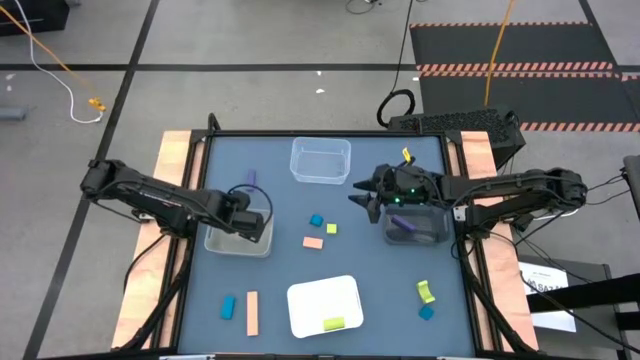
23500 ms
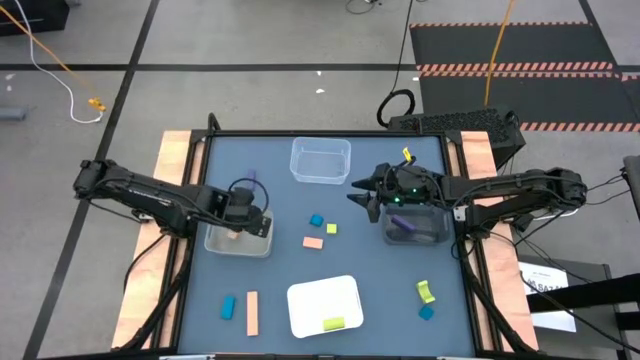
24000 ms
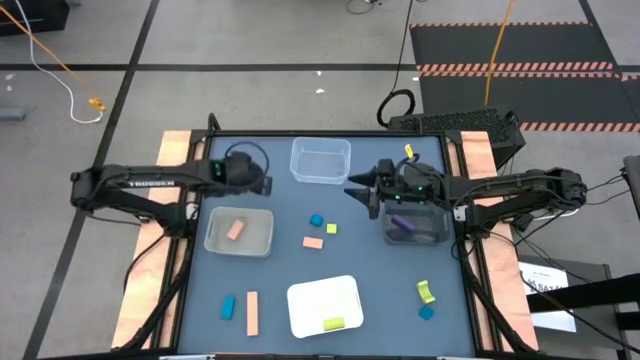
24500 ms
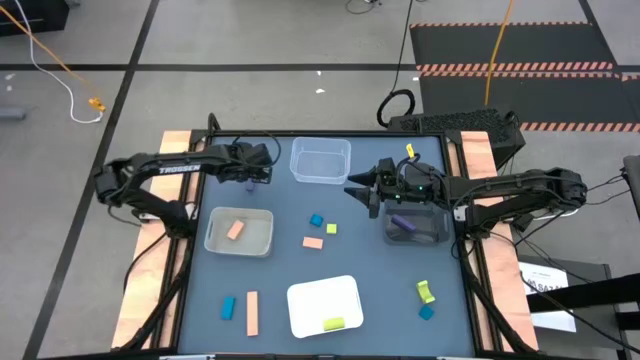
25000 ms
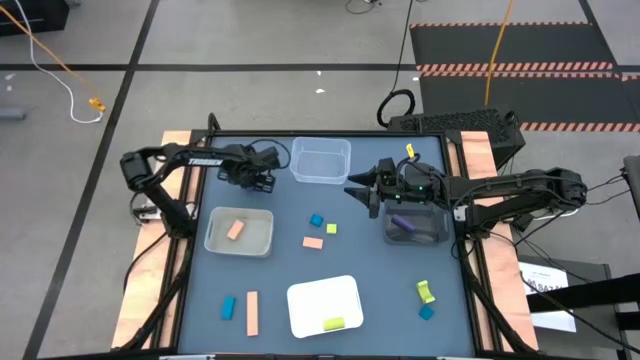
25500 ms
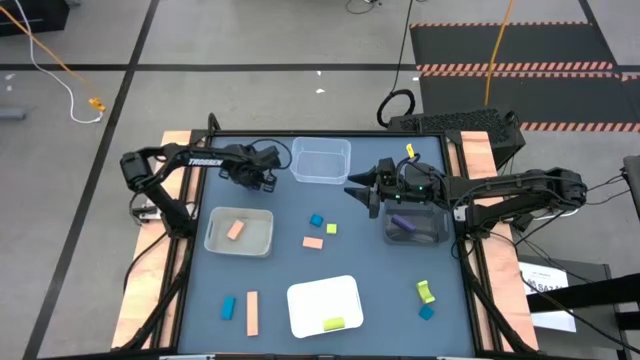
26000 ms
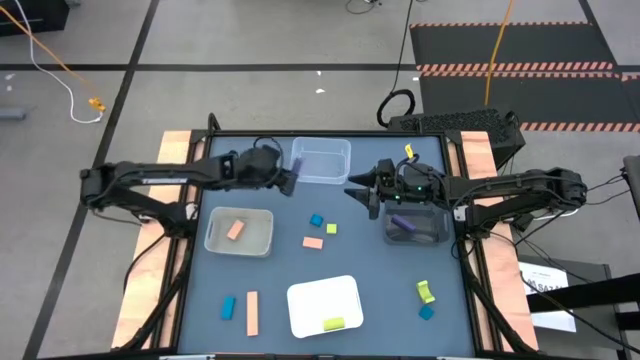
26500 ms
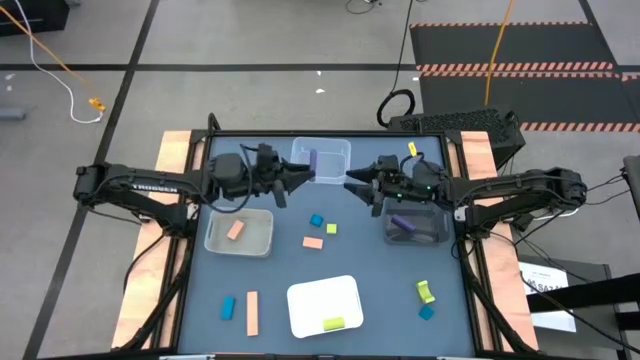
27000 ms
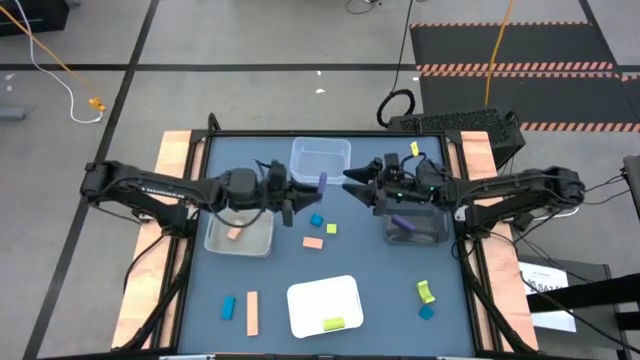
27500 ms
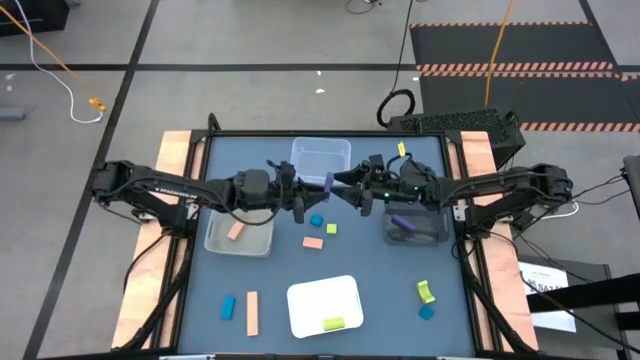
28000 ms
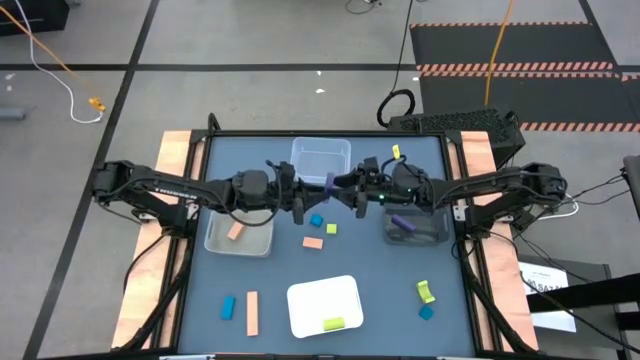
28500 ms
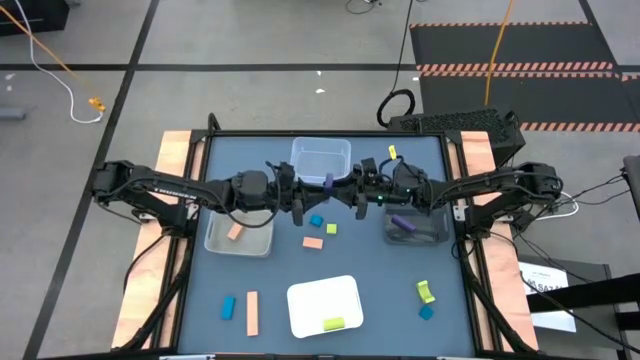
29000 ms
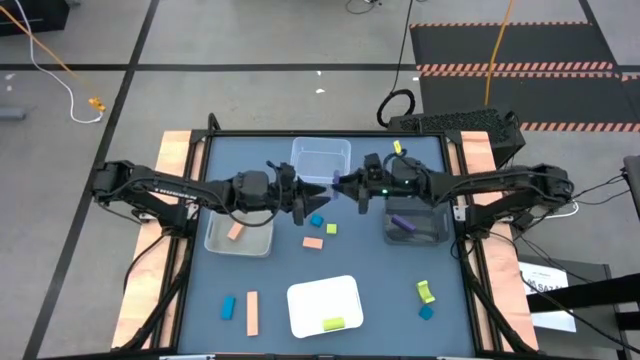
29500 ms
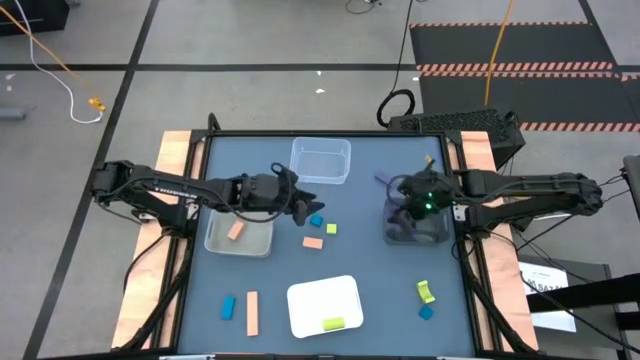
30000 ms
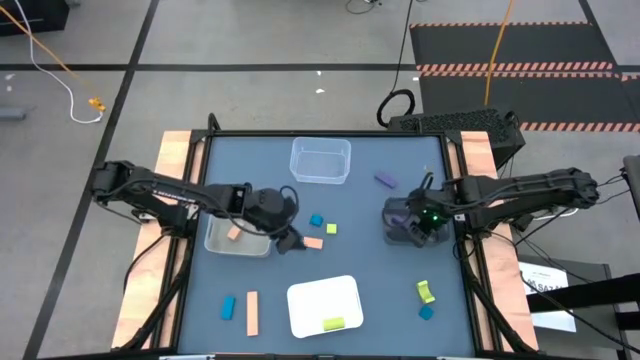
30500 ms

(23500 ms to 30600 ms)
Task: Sort & place blocks by color
Put the violet block into the black bin

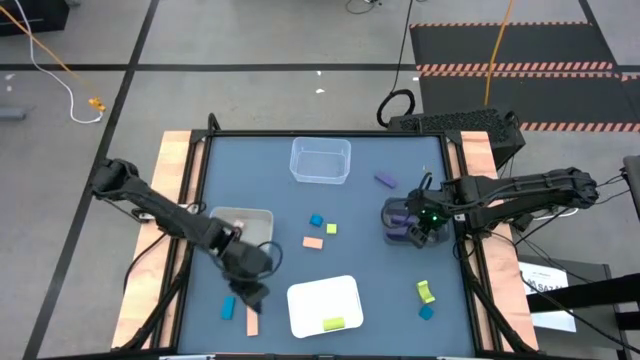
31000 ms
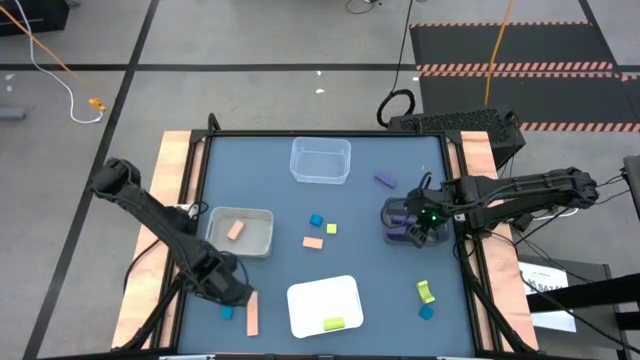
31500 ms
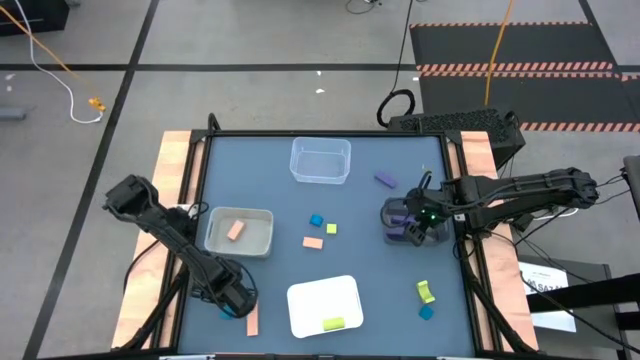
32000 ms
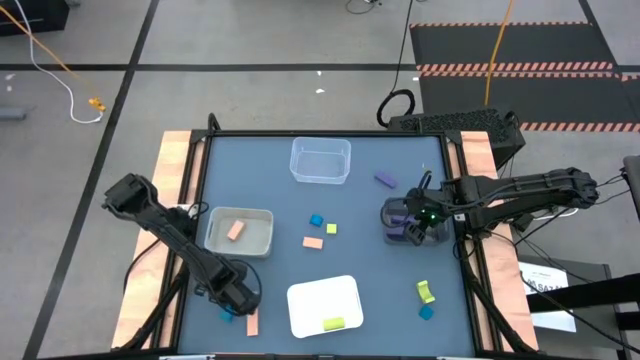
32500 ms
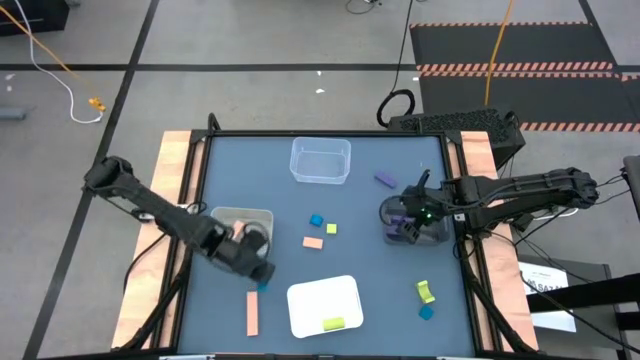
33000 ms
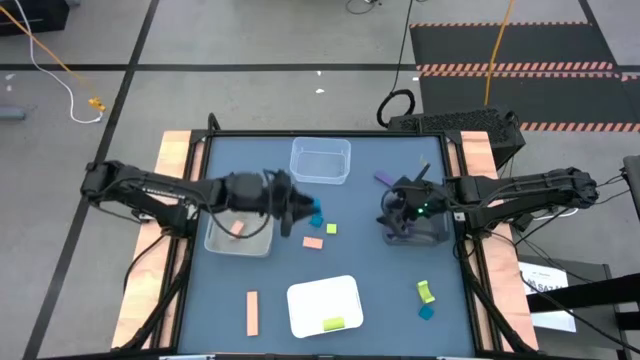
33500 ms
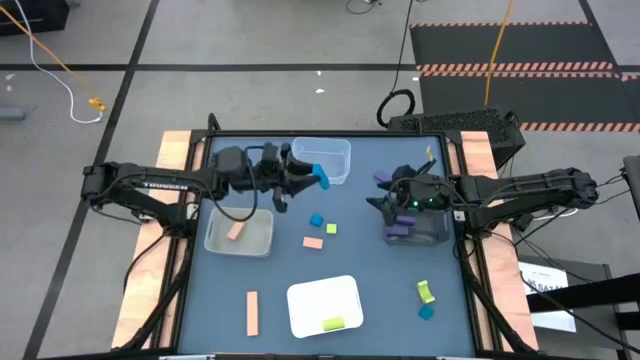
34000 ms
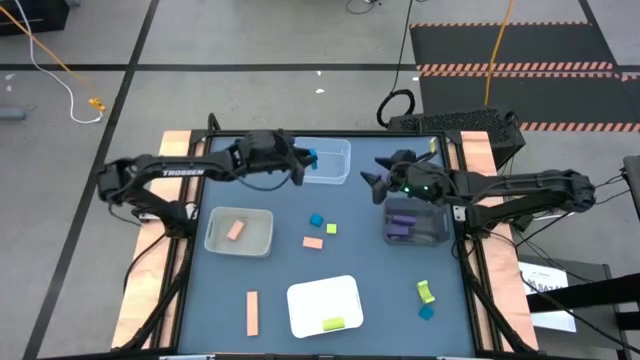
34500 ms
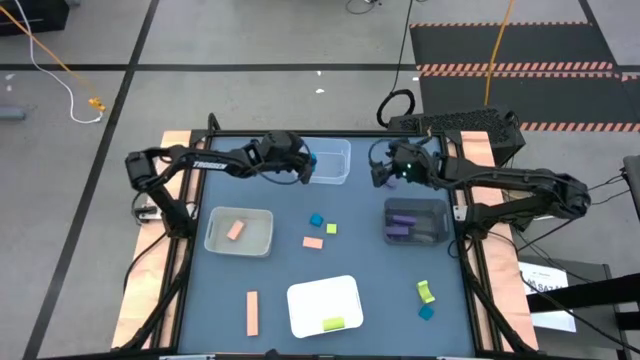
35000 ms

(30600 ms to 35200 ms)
Put the blue block into the transparent bin

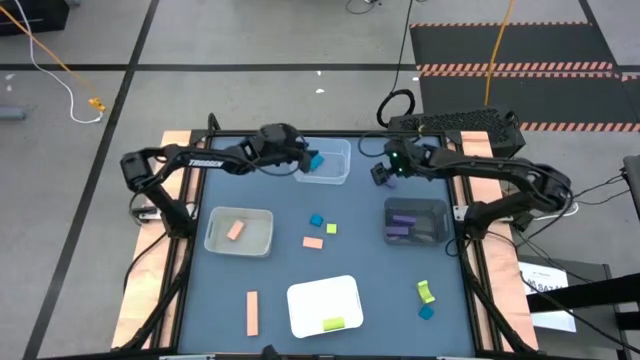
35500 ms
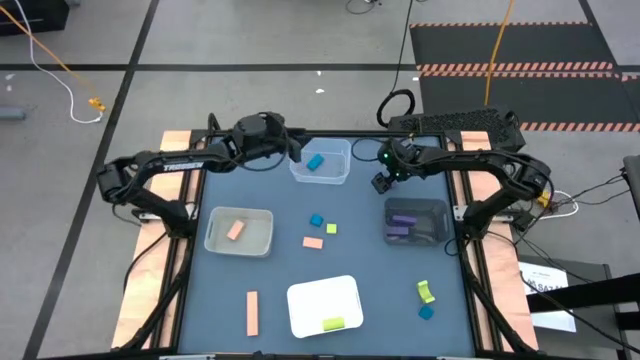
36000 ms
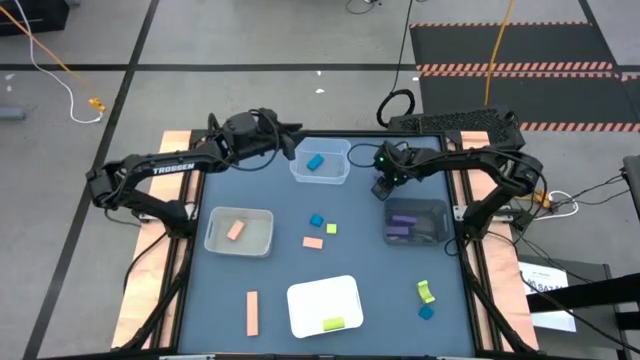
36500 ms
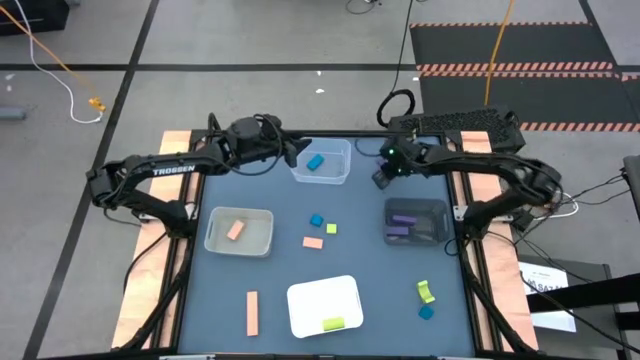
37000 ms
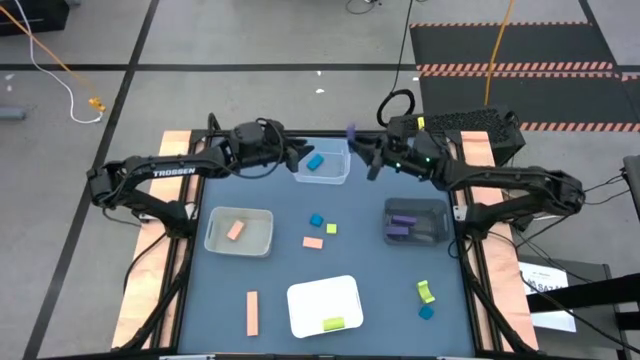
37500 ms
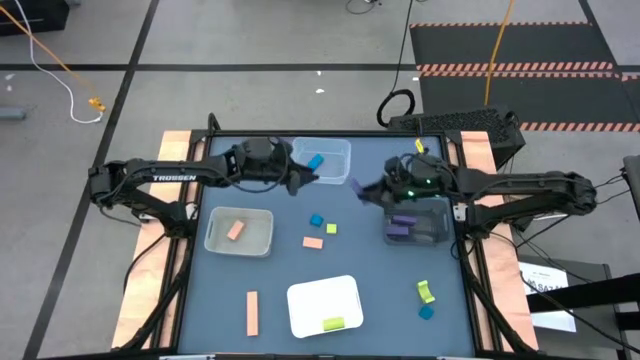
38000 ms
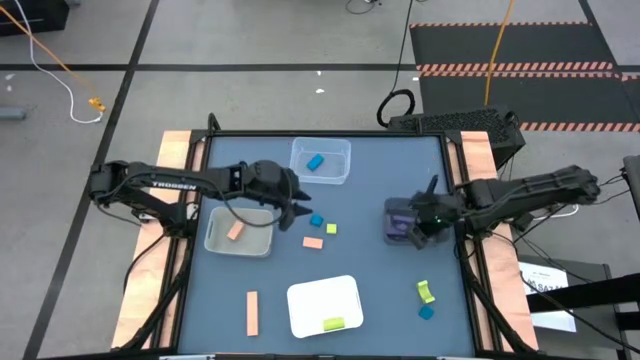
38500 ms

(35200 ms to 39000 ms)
Put the violet block into the black bin

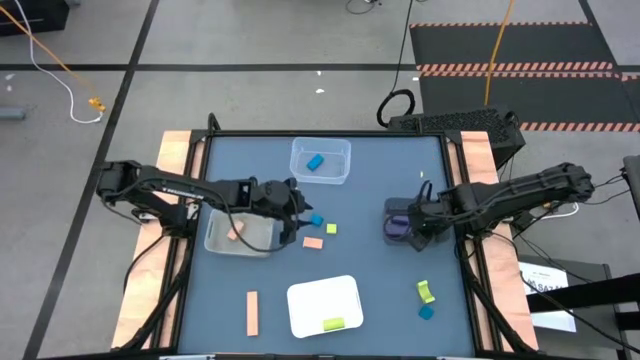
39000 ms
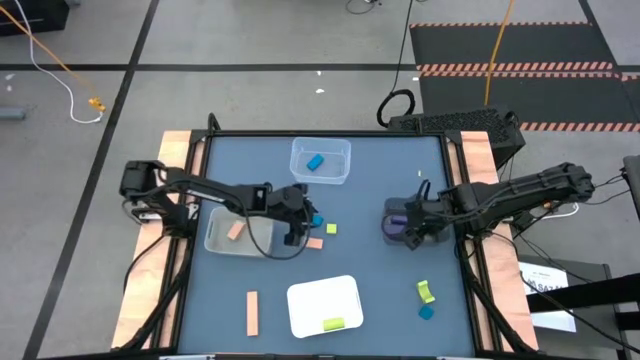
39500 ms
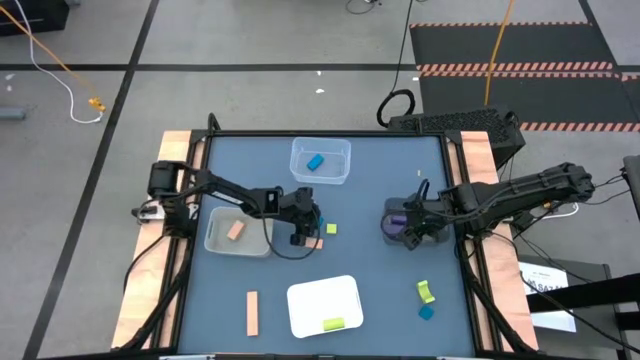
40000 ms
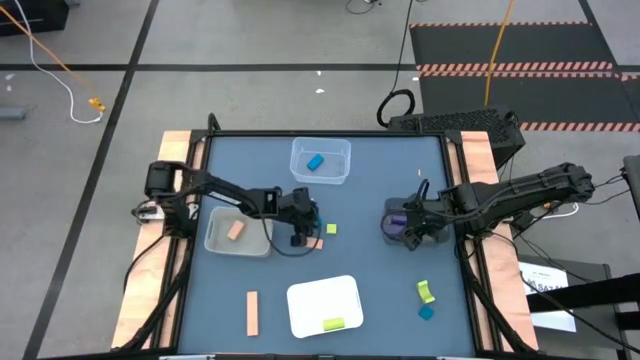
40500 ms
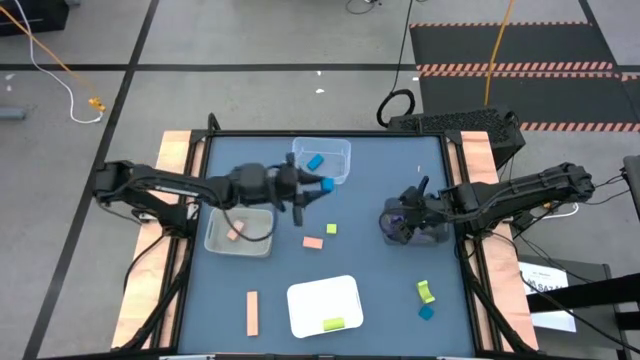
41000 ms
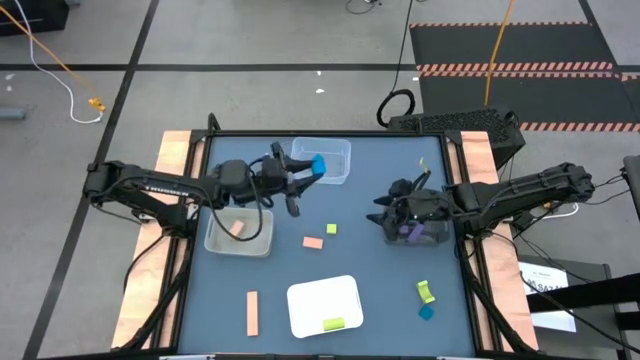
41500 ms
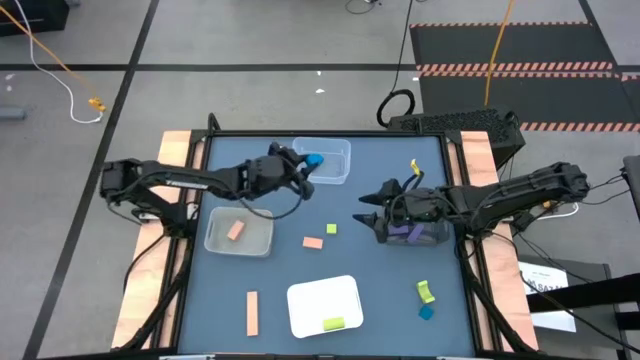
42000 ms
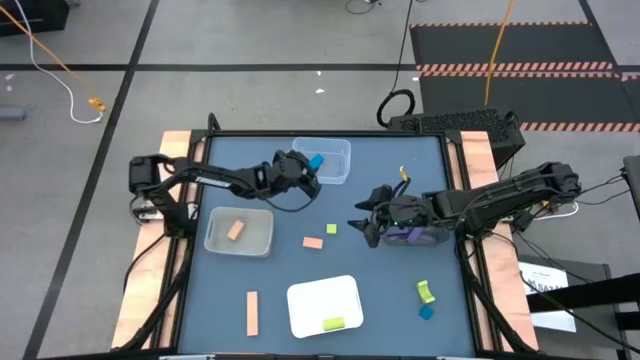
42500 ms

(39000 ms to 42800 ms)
Put the blue block into the transparent bin

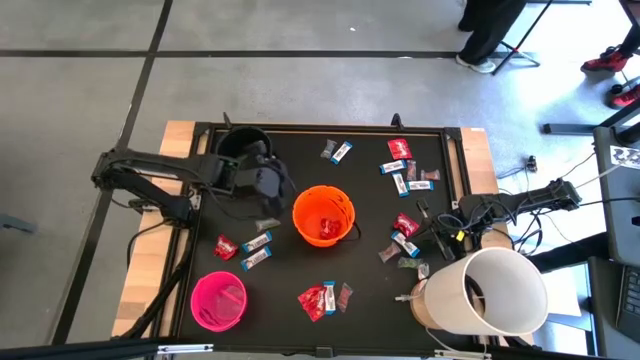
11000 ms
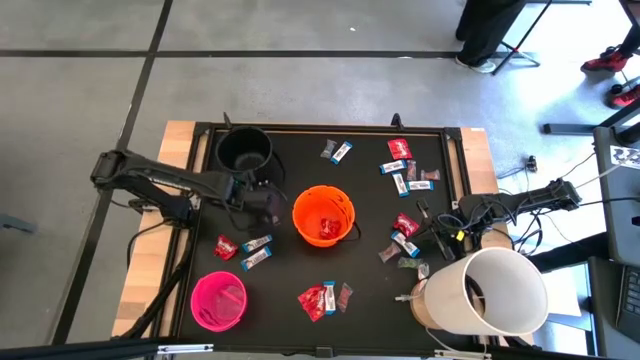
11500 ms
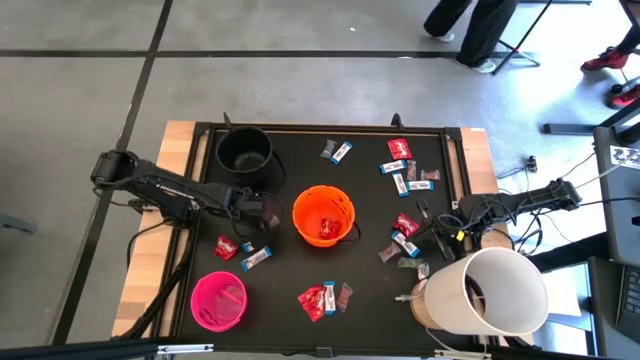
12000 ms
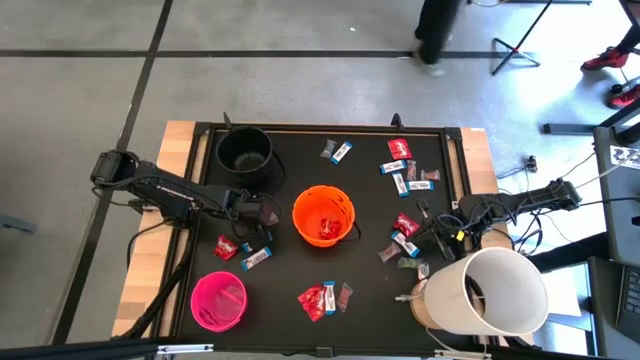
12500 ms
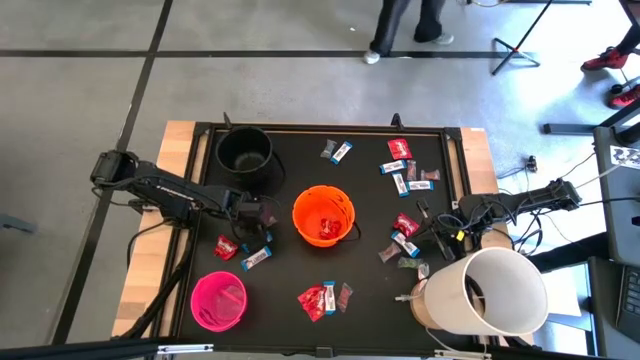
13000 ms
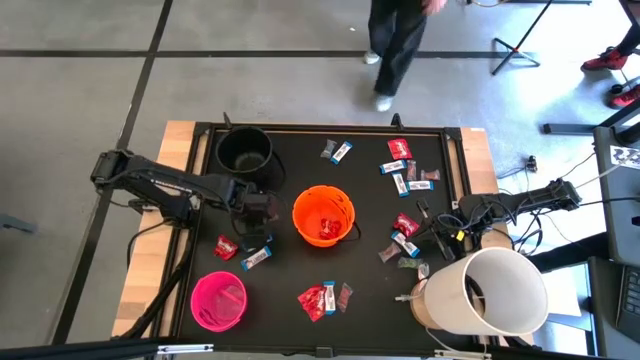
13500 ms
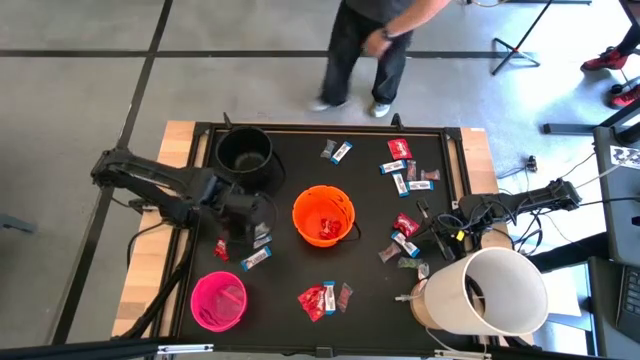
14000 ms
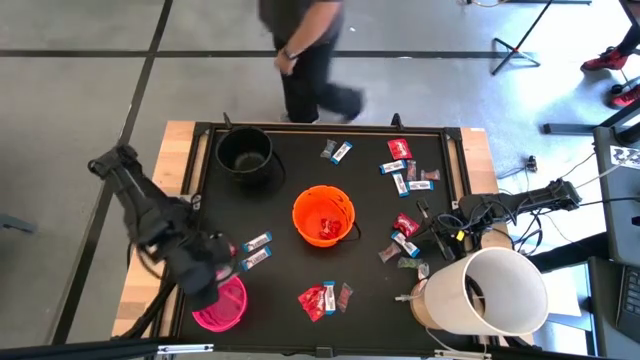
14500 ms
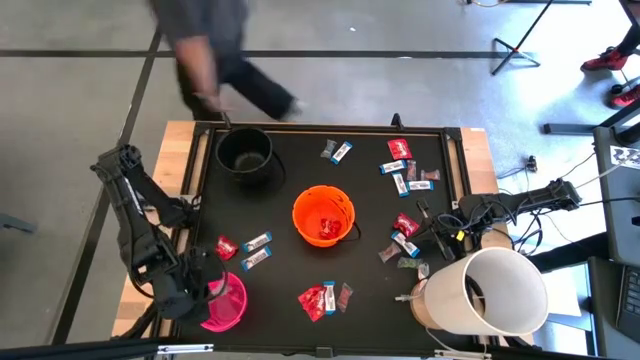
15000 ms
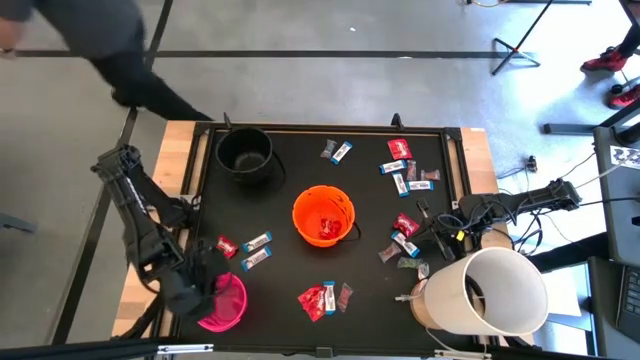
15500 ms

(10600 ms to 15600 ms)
Task: Sort candy
Put the transparent candy into the pink bucket
